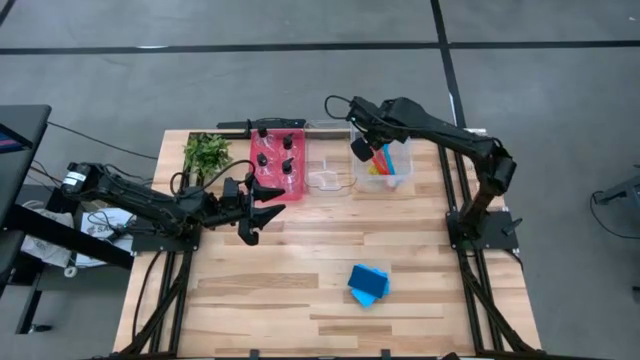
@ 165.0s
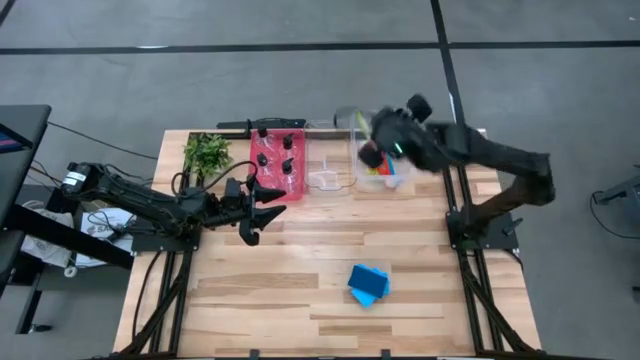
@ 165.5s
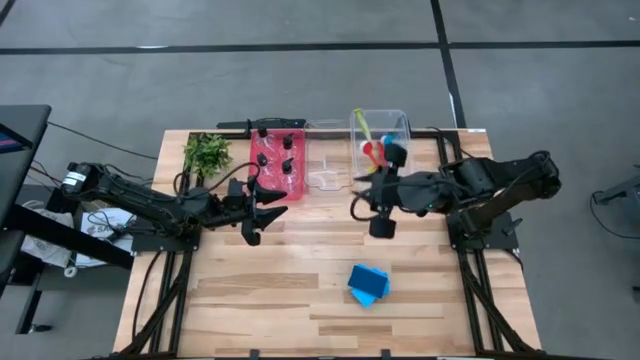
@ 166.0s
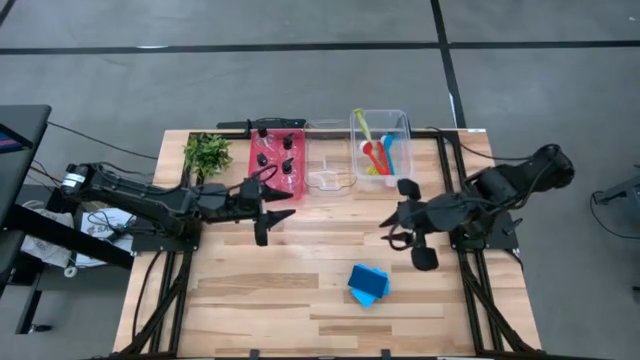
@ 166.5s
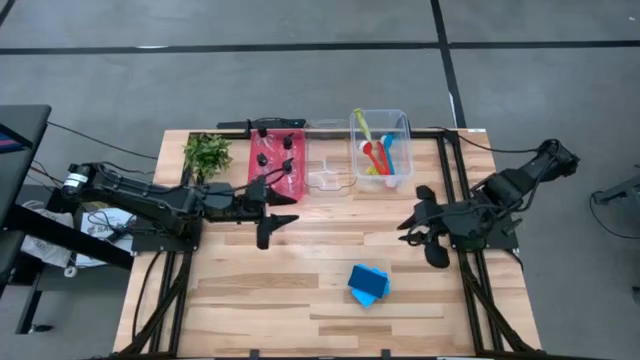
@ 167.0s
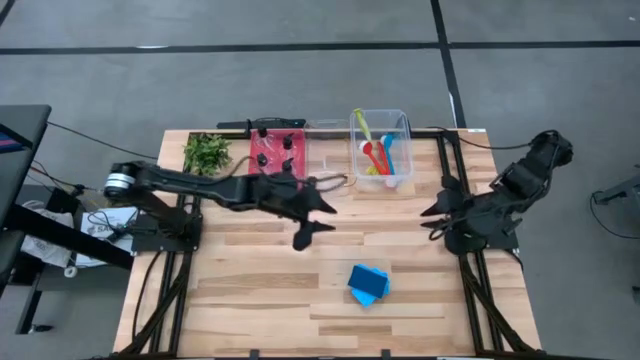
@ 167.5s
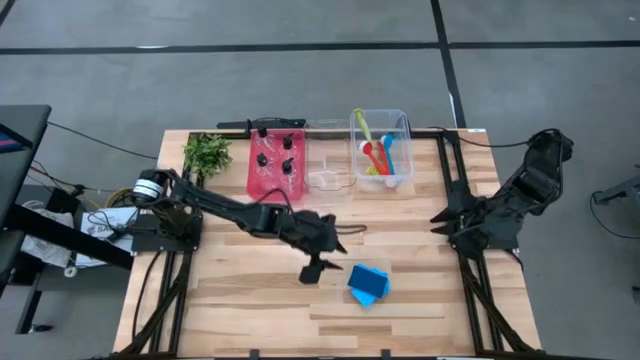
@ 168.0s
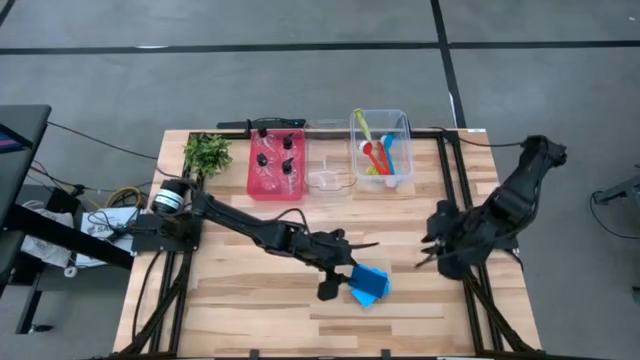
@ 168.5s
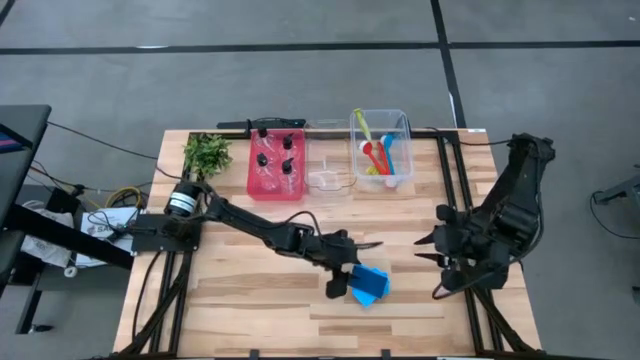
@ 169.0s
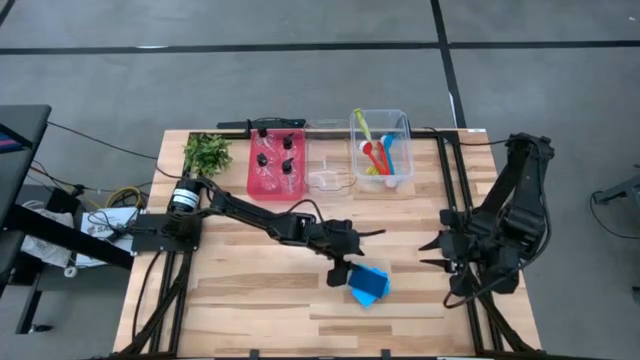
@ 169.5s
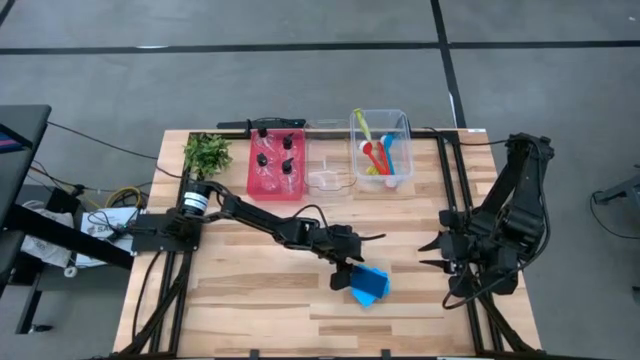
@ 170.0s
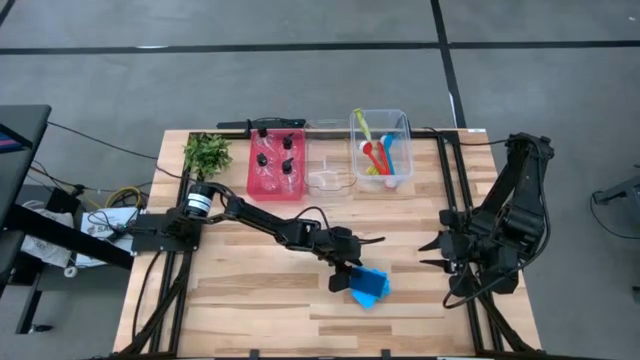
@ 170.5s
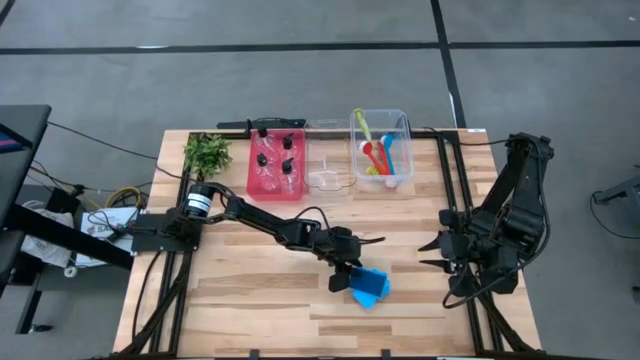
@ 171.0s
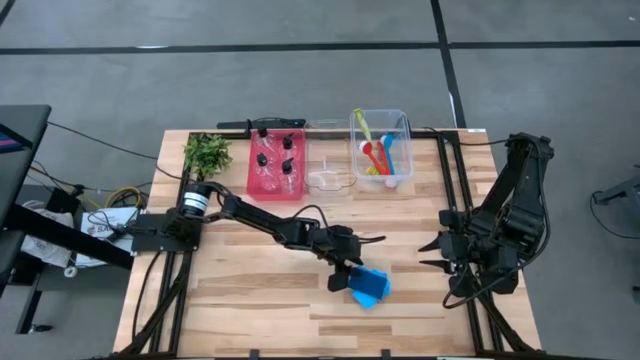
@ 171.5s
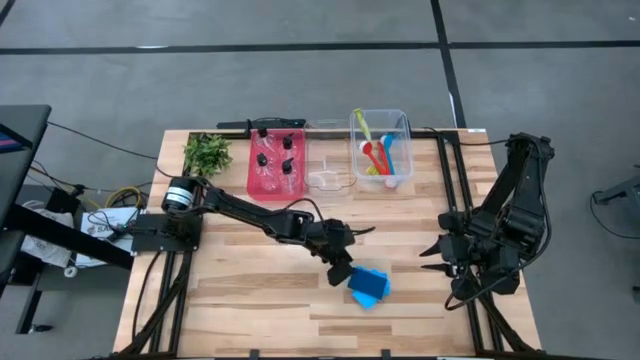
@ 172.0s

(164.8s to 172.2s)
Task: Pick & Place Kitchen Sink Supplies
Put the blue sponge into the transparent bin

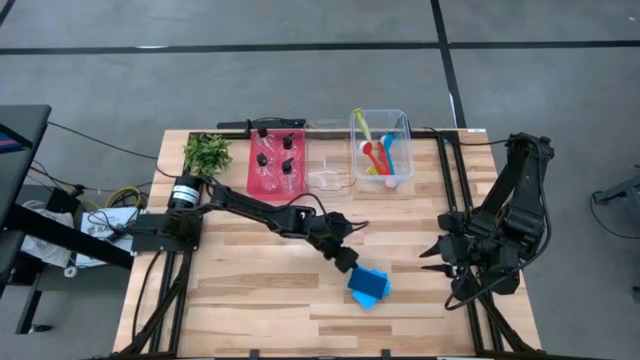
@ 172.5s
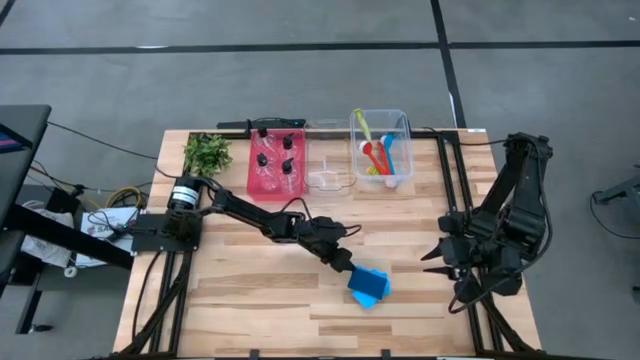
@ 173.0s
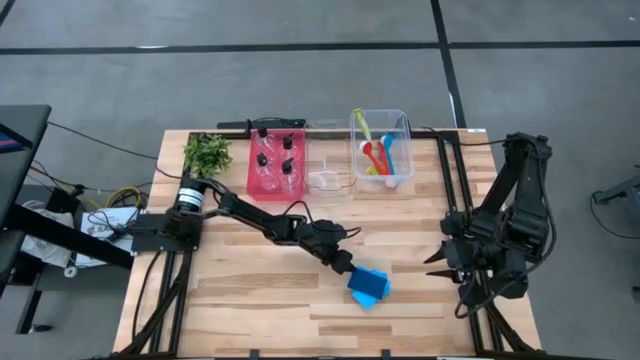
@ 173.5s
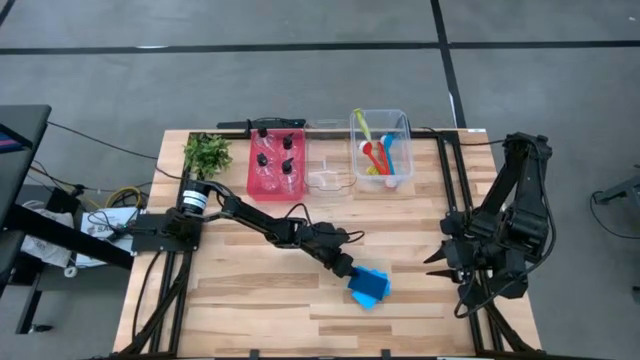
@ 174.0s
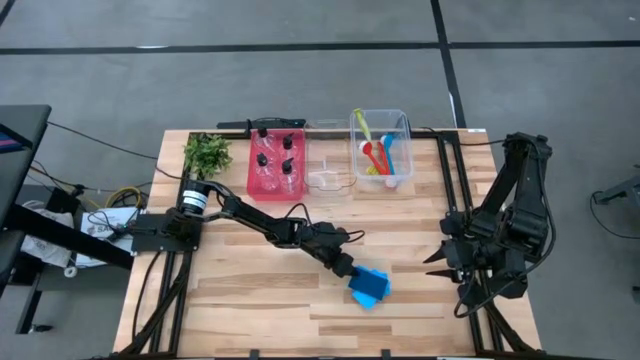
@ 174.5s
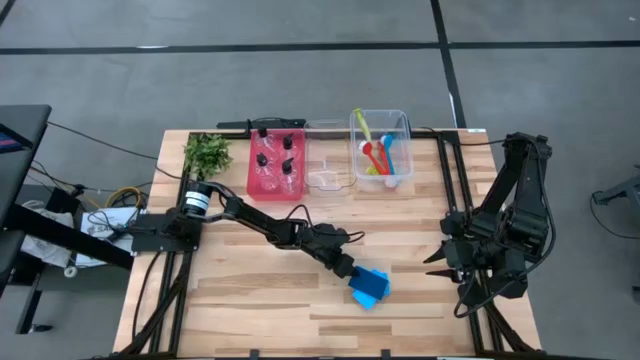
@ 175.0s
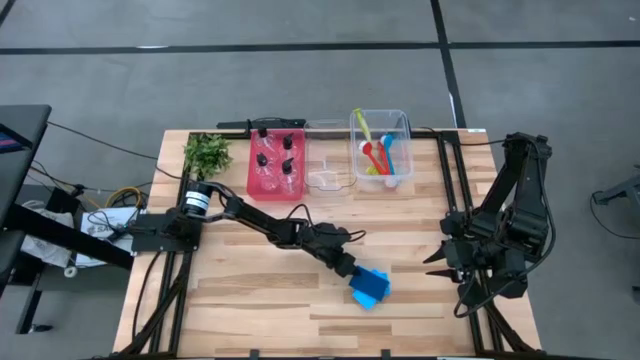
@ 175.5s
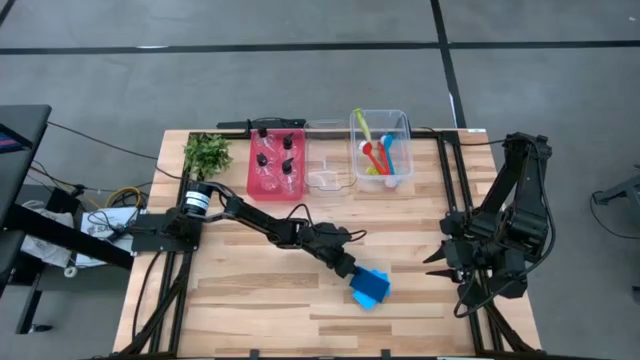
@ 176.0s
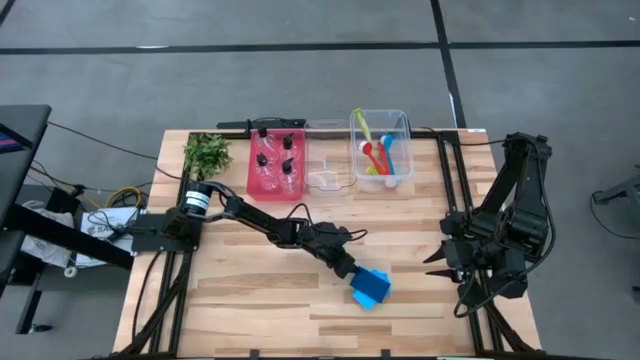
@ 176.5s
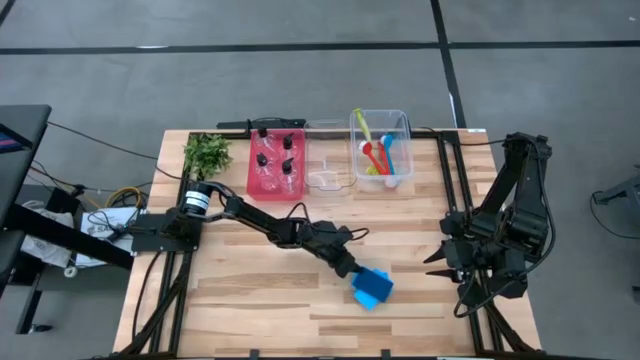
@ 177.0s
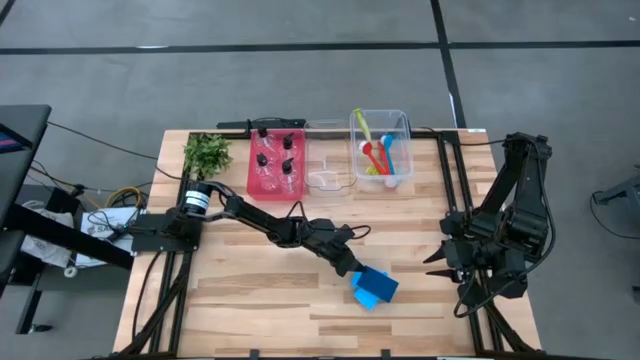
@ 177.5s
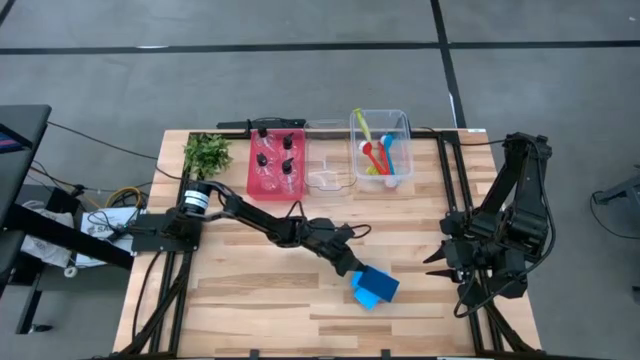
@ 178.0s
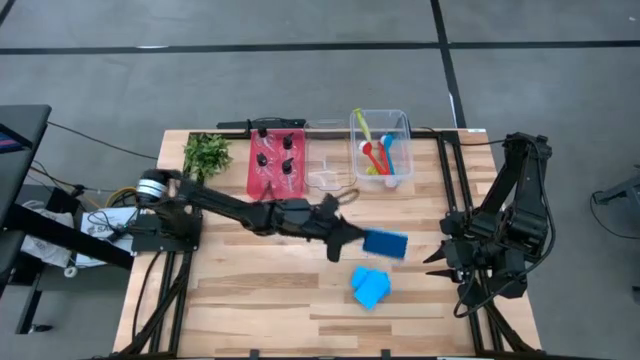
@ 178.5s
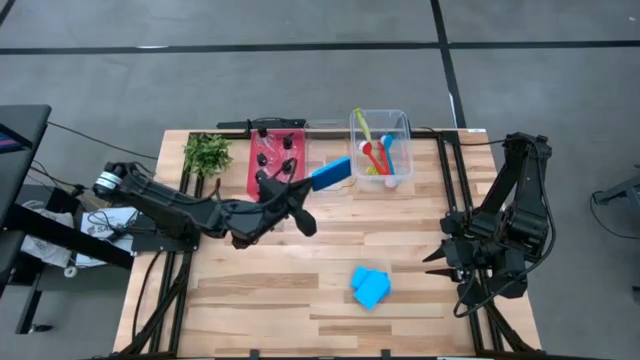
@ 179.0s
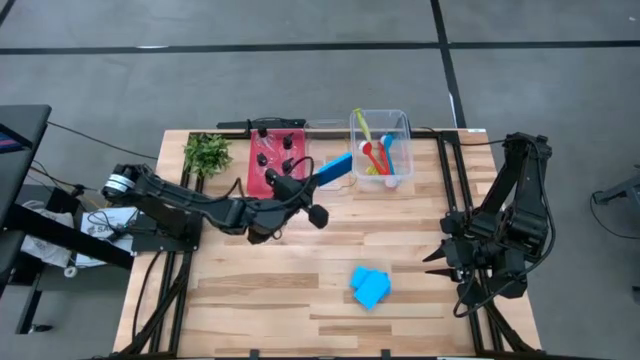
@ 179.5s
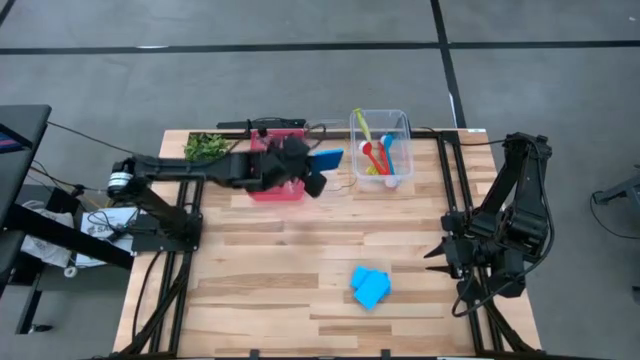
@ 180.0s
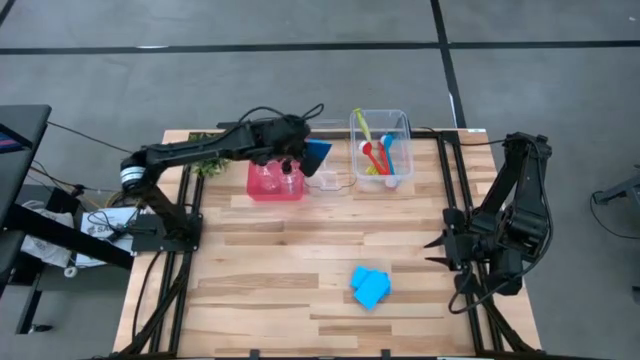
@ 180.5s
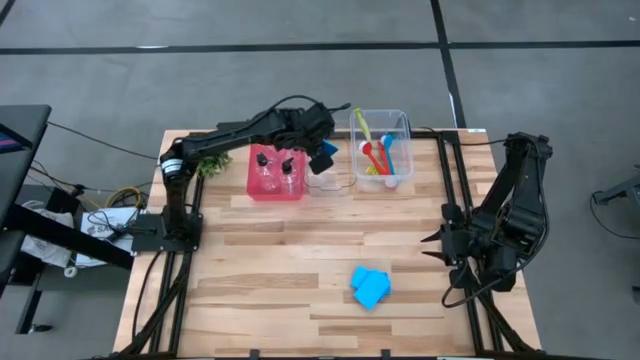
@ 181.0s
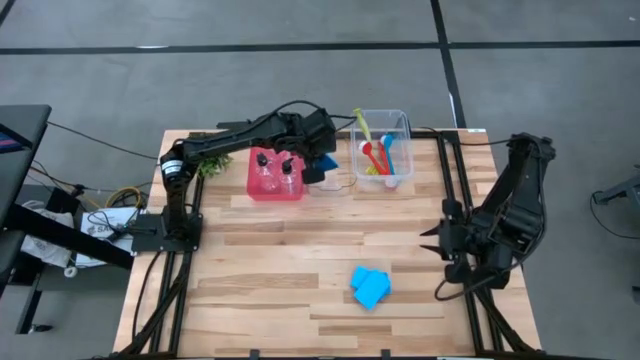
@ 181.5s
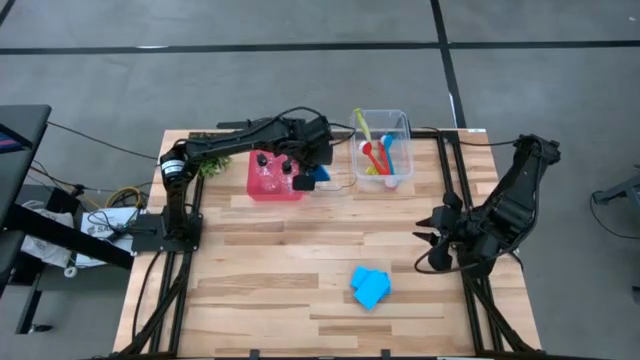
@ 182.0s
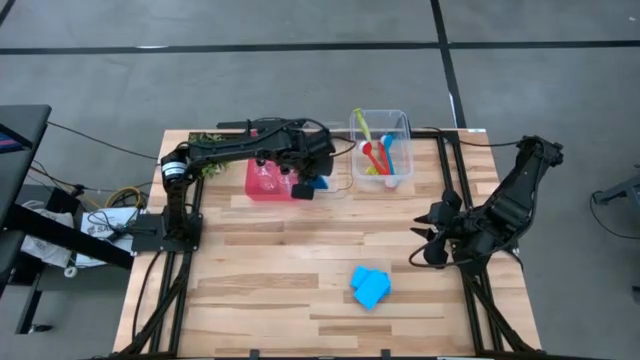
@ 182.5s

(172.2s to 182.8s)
Put the blue sponge into the transparent bin

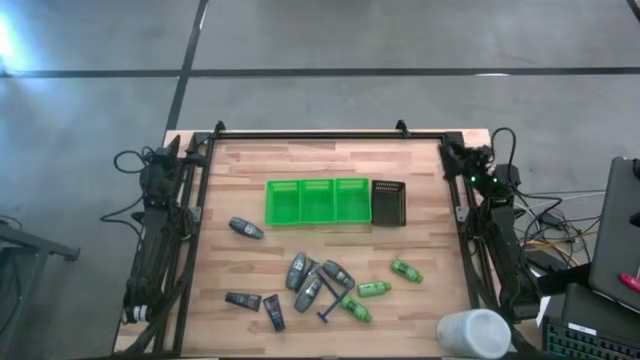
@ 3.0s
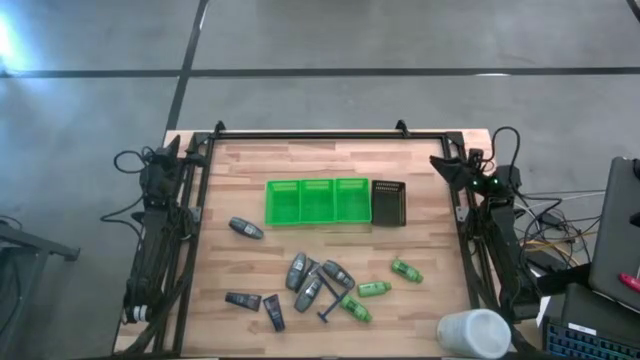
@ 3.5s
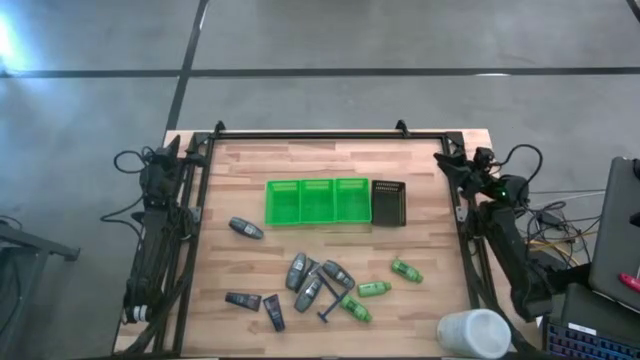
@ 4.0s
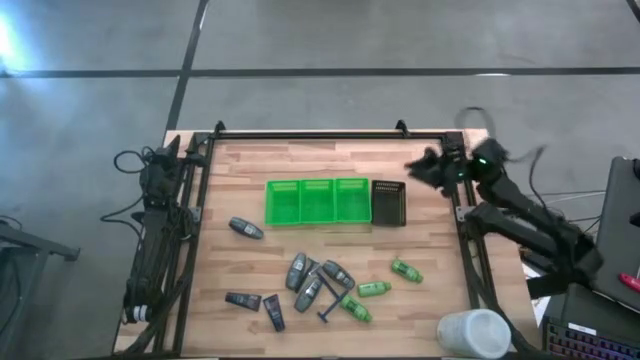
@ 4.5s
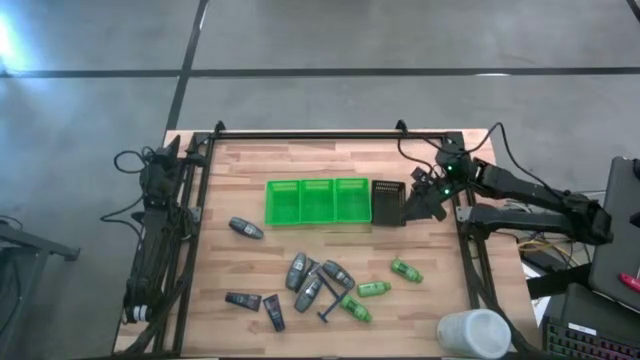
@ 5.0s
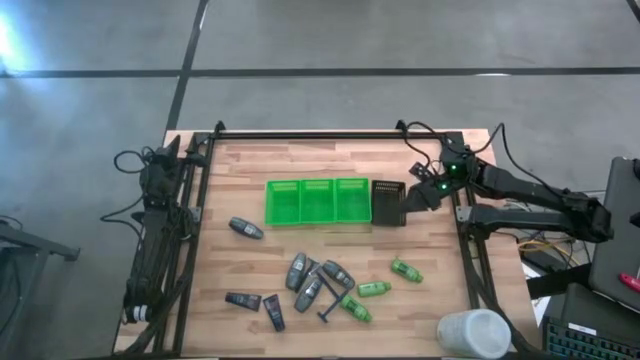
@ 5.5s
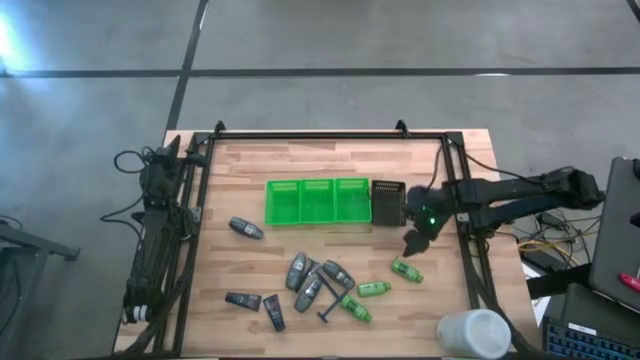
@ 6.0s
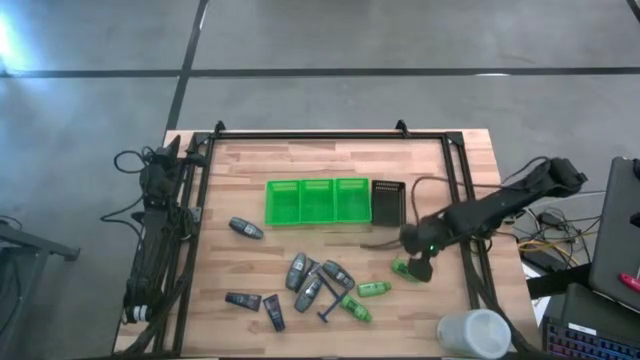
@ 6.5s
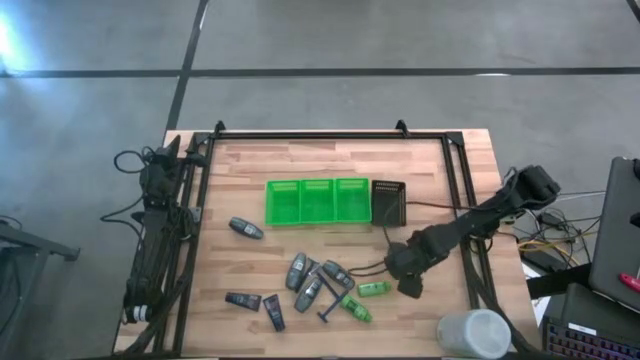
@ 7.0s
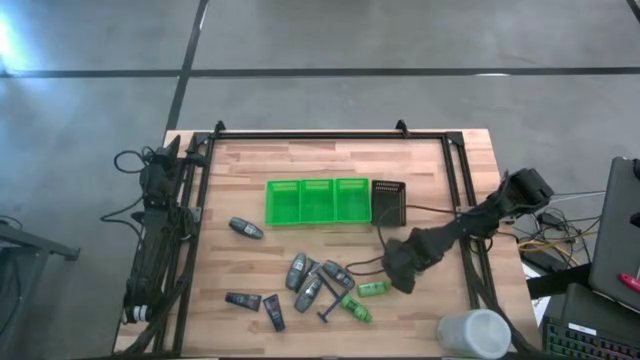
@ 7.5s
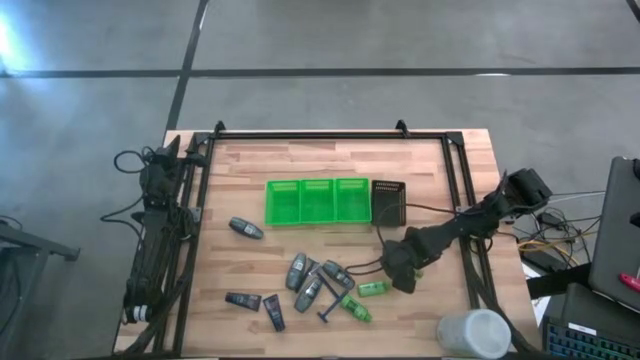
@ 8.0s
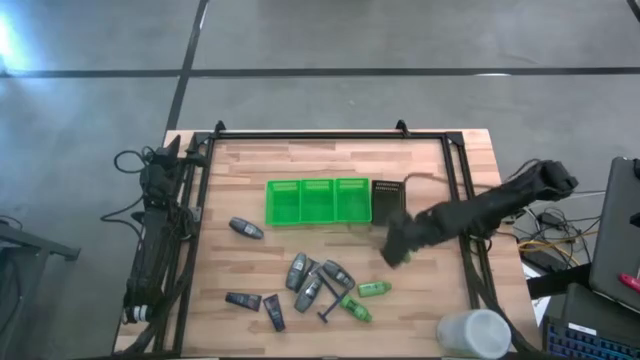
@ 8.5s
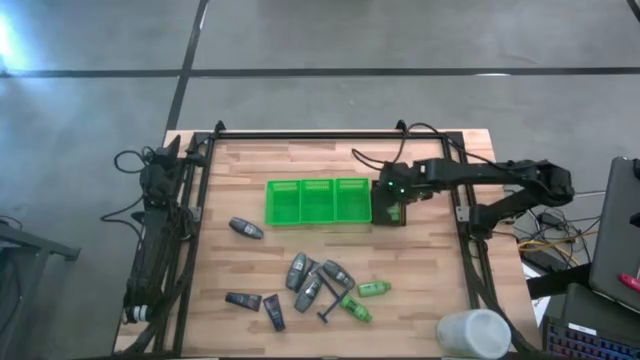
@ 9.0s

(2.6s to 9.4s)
Task: Pick & Place Travel size toiletries
Put the shampoo into the black bin
